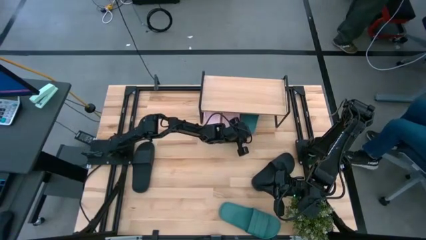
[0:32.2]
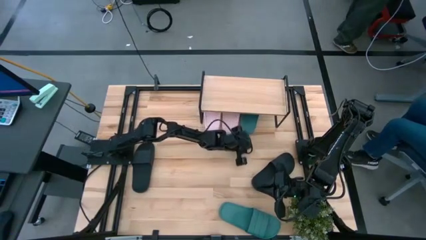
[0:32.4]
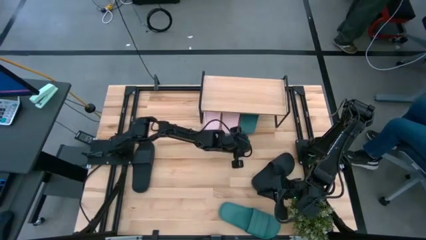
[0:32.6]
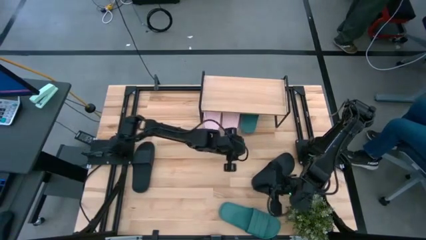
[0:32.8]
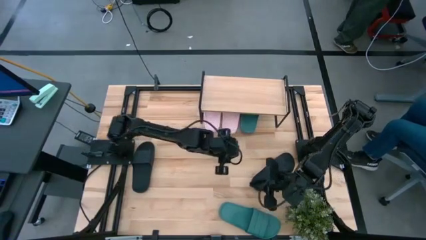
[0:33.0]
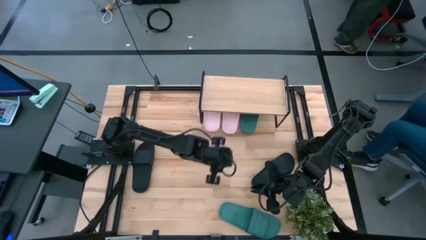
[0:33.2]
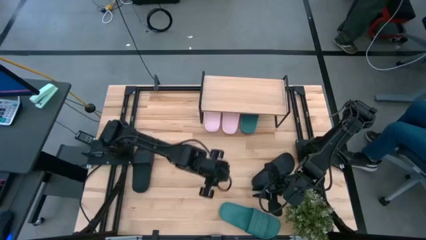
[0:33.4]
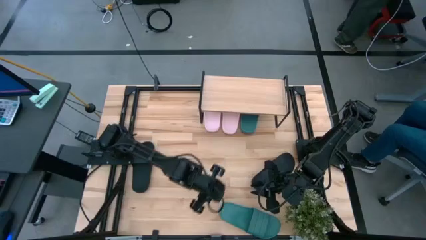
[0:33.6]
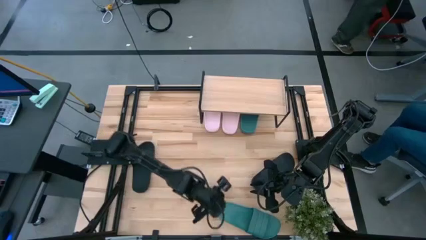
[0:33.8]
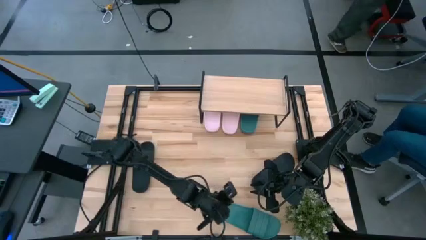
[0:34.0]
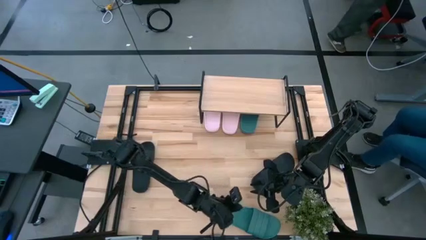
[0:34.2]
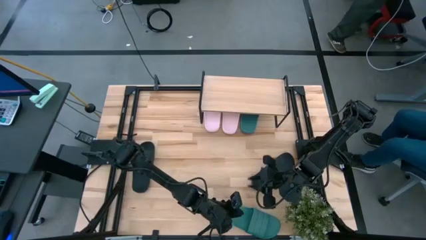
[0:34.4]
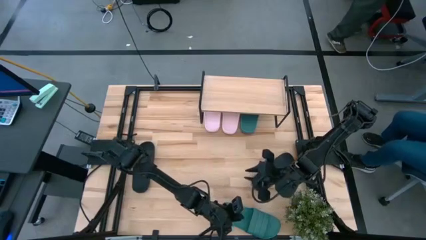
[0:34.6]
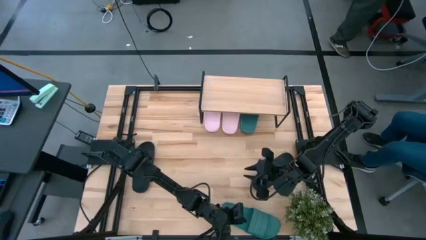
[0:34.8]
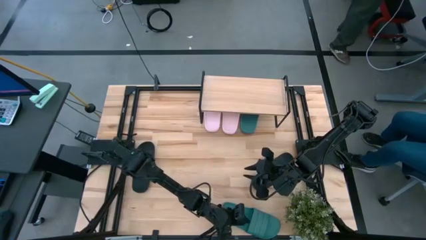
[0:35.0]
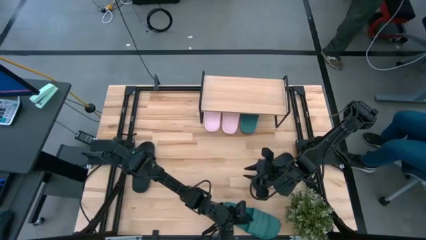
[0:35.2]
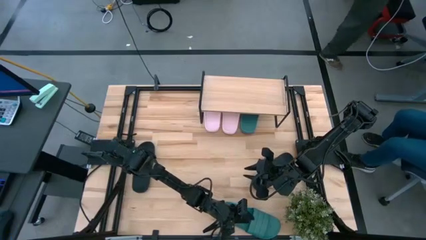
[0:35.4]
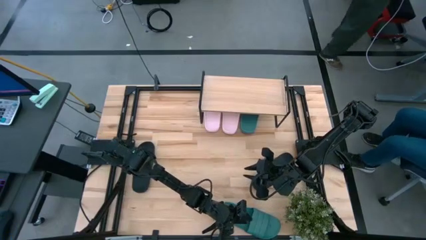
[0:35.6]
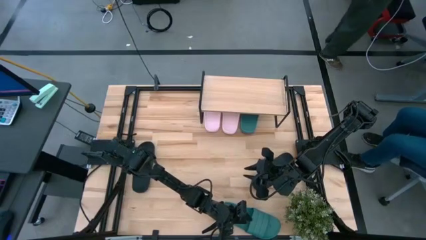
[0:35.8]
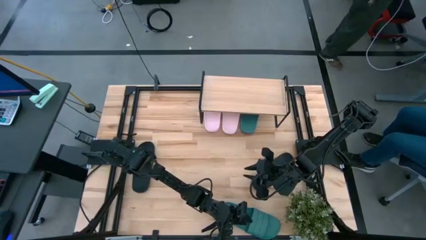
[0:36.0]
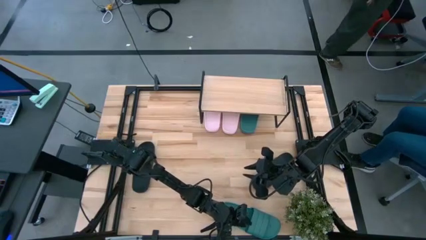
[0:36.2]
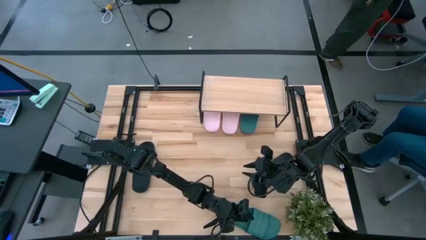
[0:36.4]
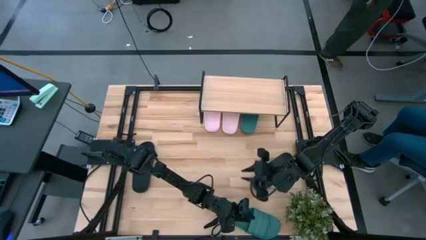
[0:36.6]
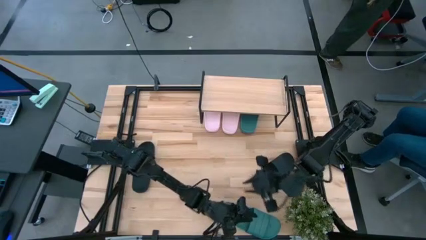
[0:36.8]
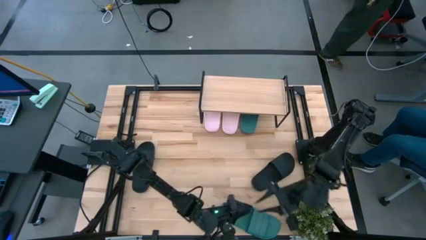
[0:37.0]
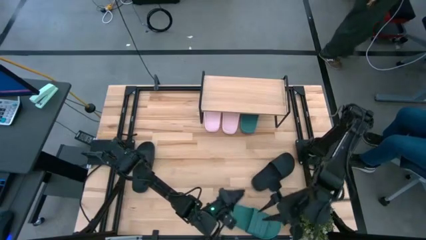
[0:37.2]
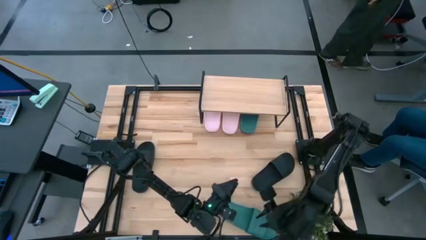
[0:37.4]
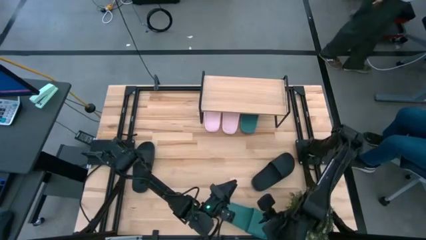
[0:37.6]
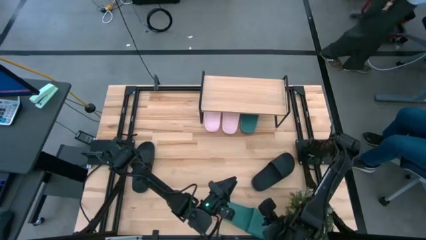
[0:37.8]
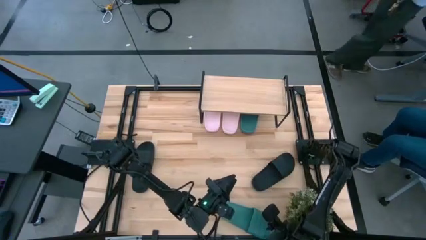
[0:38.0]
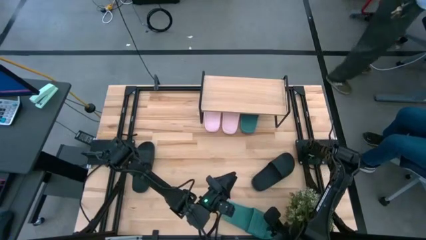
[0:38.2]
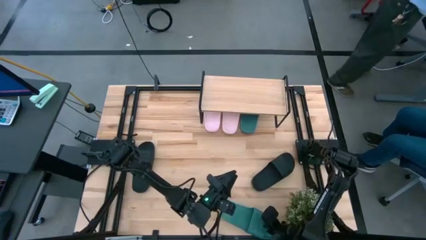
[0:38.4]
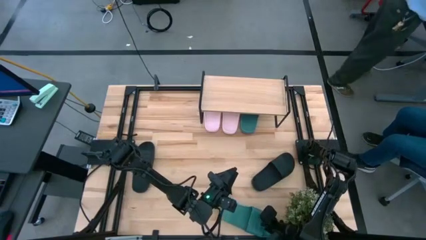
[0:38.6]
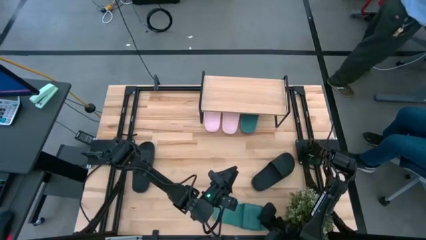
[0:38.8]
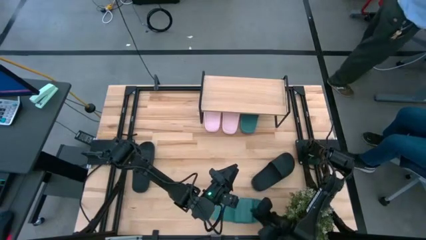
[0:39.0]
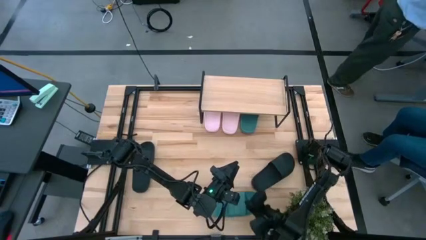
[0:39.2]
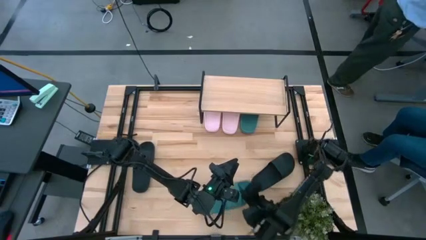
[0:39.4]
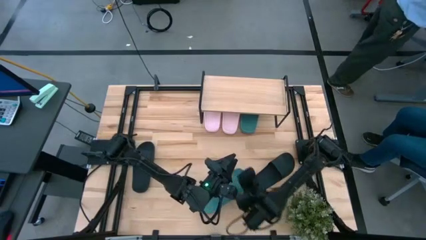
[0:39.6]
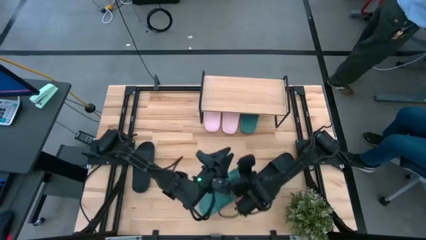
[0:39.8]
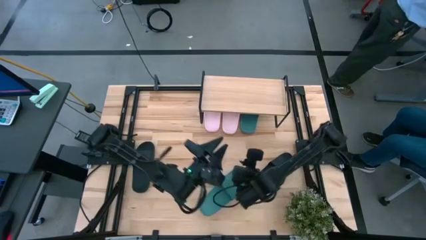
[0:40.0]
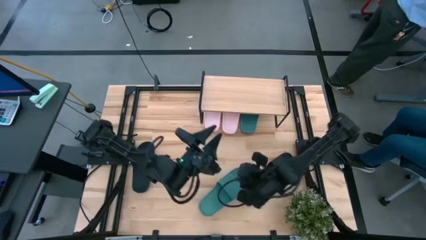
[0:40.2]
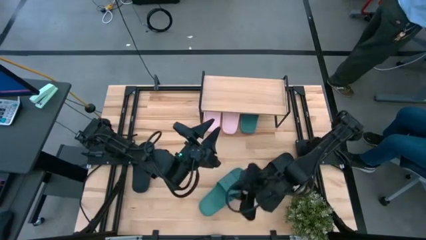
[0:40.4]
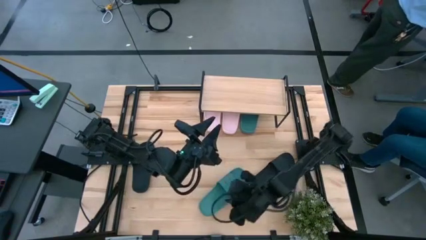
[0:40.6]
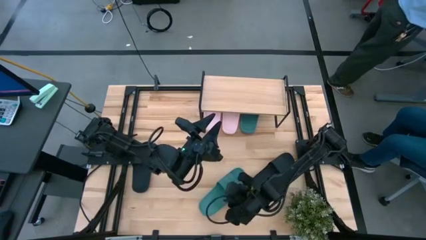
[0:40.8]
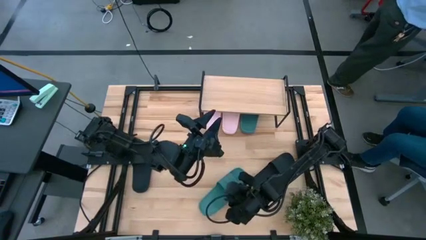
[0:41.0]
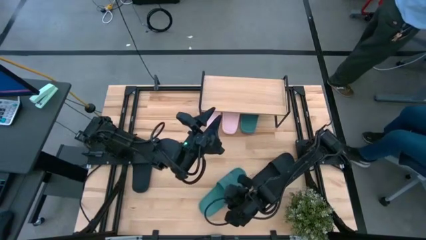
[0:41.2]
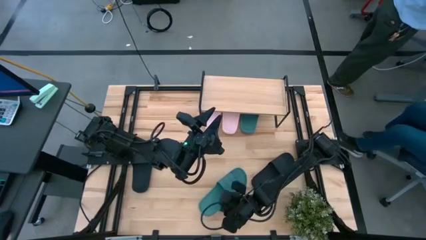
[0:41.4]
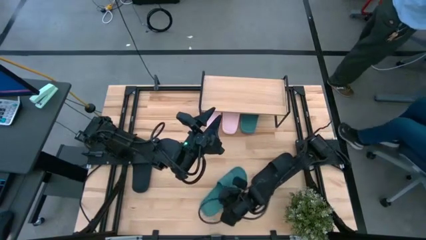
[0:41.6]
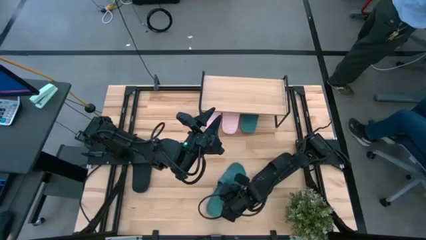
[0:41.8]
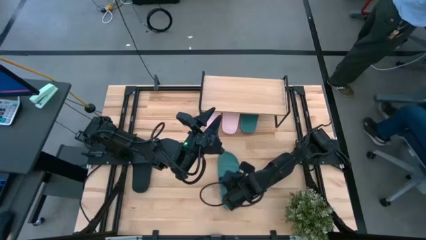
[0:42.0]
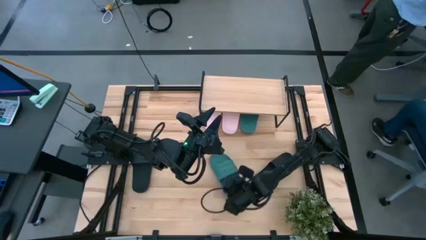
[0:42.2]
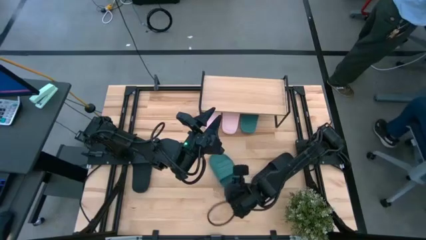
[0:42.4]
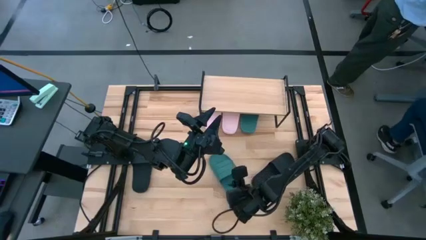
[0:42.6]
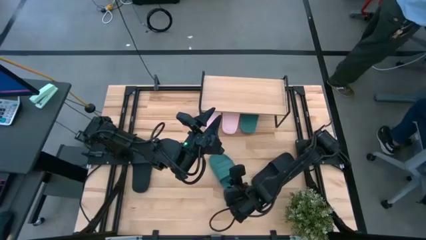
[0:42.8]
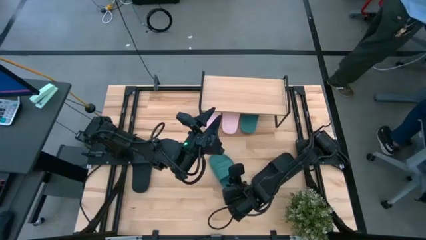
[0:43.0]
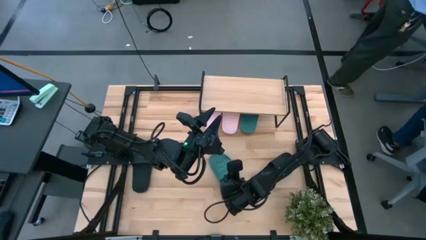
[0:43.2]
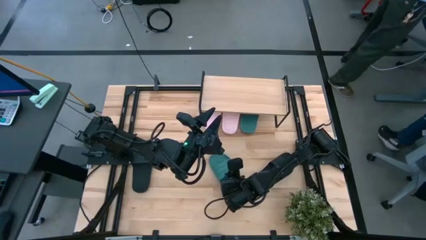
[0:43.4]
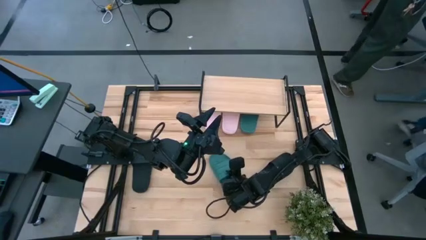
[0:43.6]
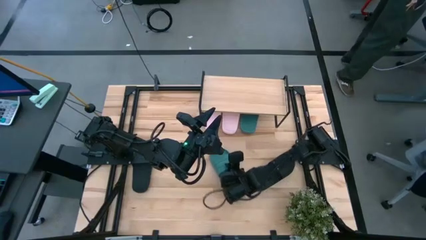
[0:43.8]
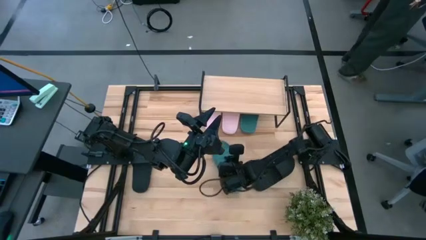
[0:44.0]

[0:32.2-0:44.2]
Task: Pick and place slides into the shelf
Put the dark green slide under the shelf

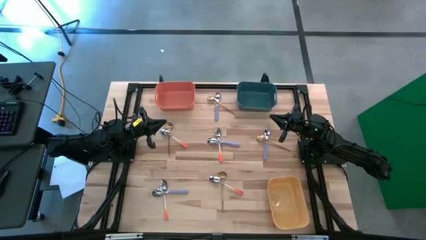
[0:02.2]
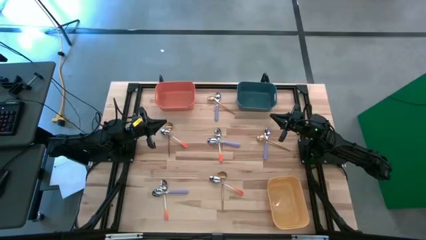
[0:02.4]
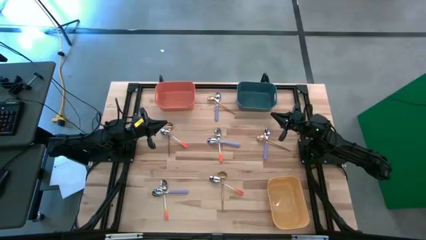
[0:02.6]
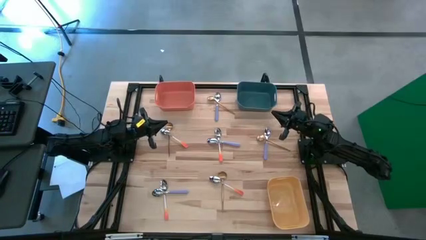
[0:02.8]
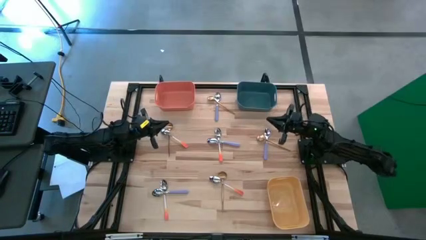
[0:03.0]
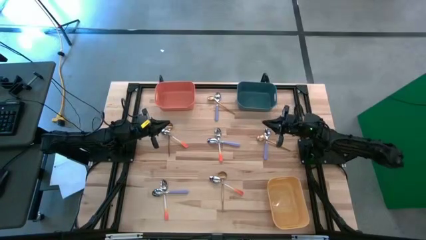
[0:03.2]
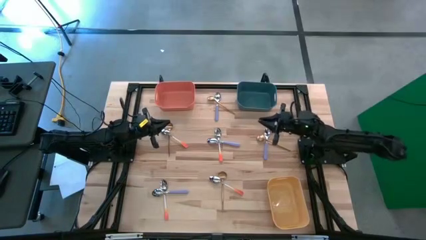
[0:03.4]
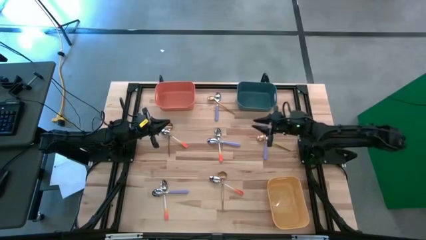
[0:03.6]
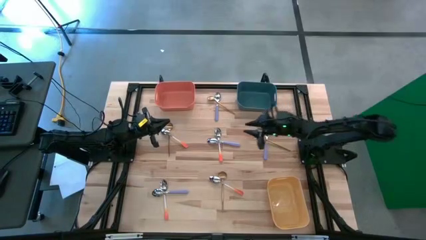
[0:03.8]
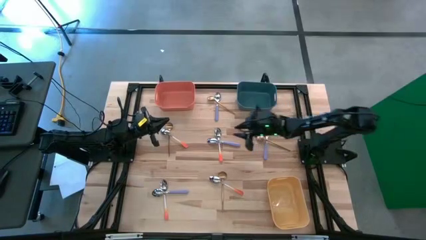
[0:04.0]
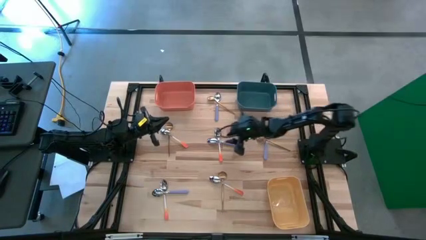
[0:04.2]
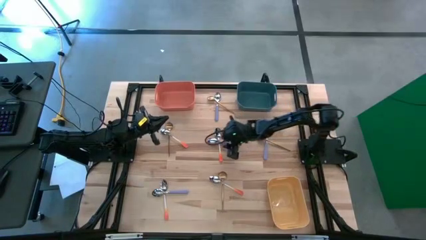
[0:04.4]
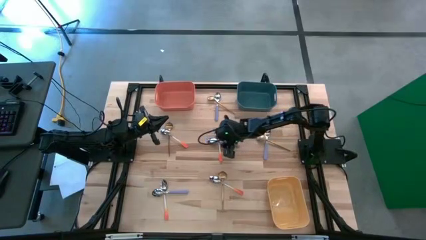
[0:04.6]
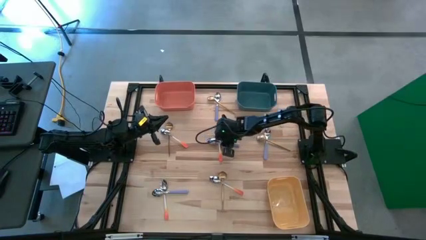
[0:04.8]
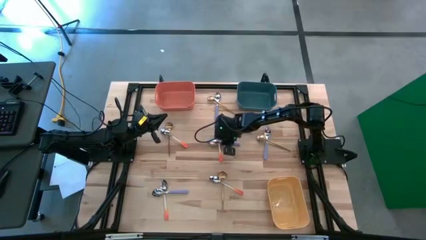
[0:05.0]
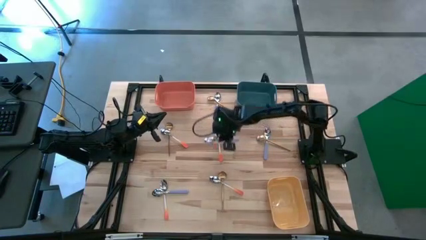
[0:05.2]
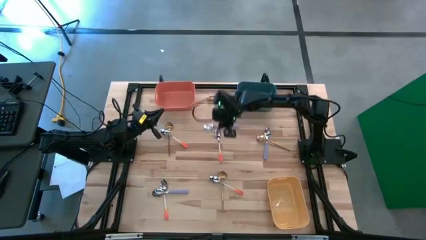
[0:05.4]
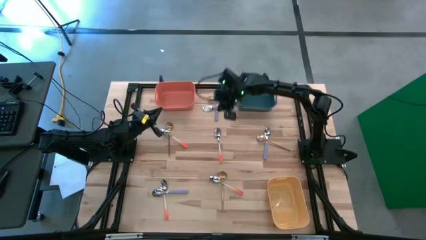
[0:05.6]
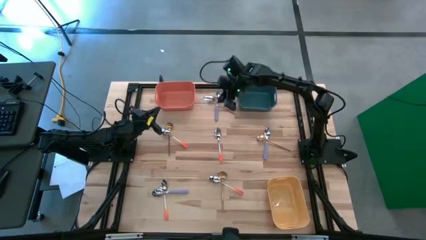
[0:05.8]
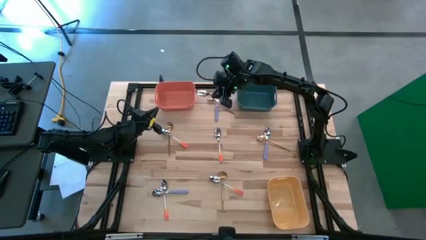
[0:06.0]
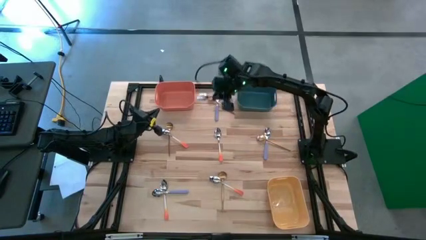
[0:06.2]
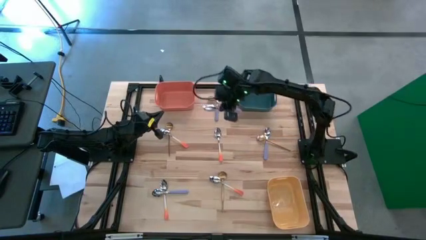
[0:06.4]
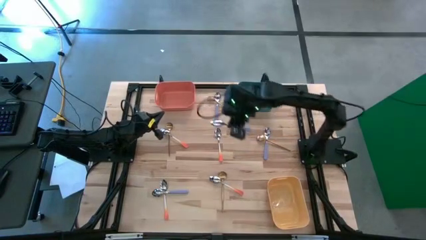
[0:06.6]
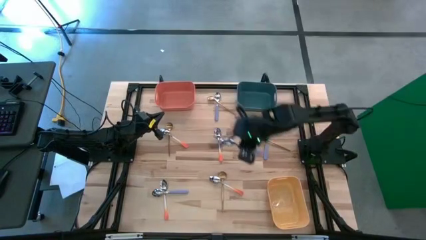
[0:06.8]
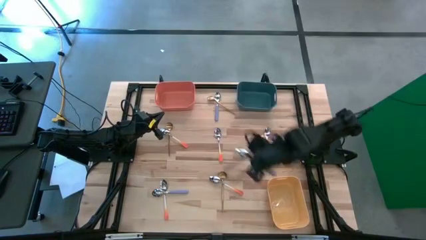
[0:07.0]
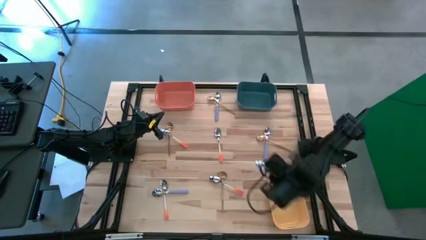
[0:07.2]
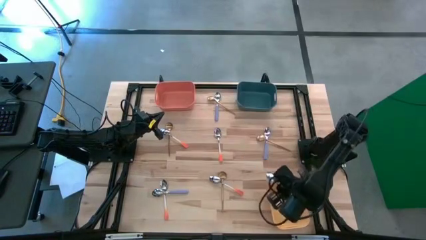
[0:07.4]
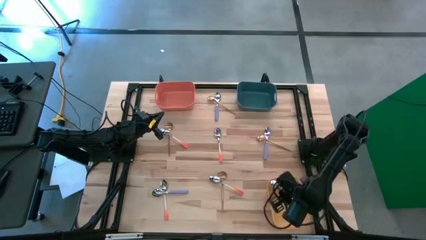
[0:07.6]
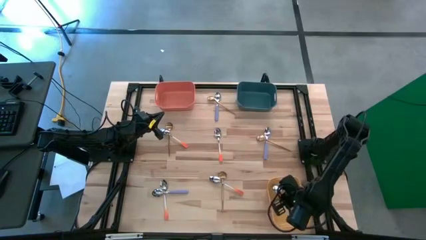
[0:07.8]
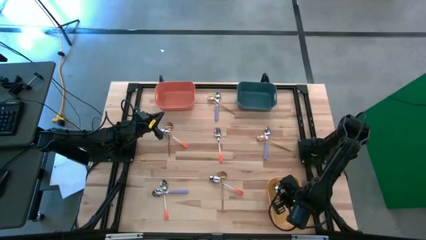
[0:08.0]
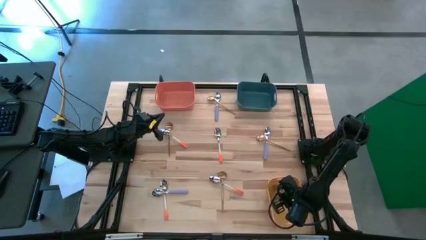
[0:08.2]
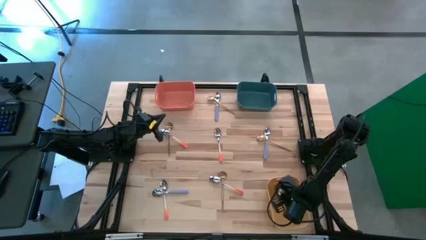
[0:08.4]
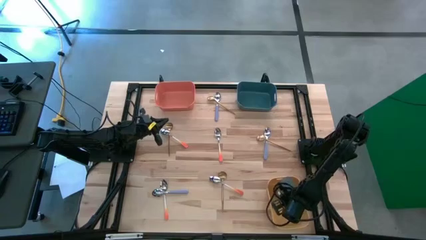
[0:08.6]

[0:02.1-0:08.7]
Task: Sort silverware by color (type)
Put the violet spoon into the yellow bin
